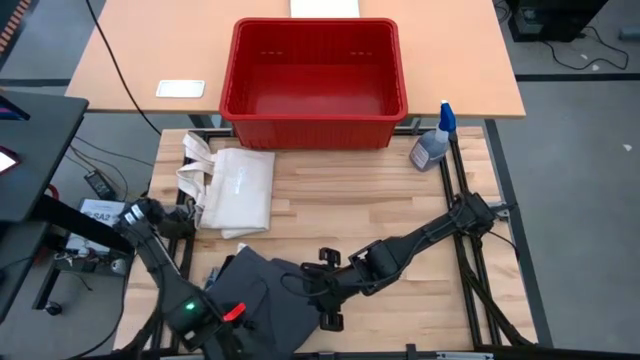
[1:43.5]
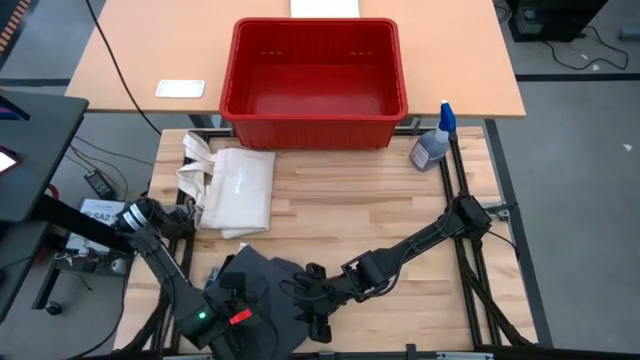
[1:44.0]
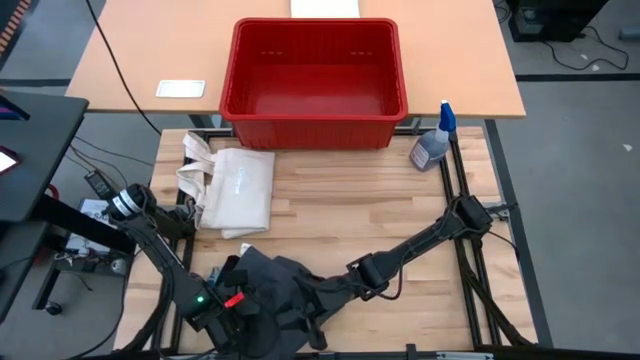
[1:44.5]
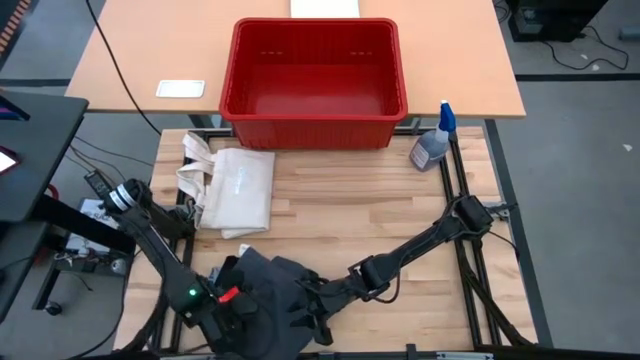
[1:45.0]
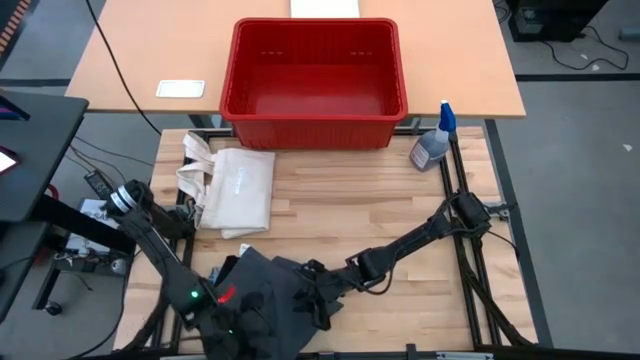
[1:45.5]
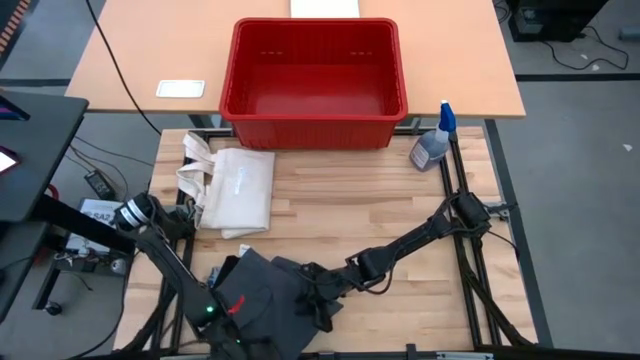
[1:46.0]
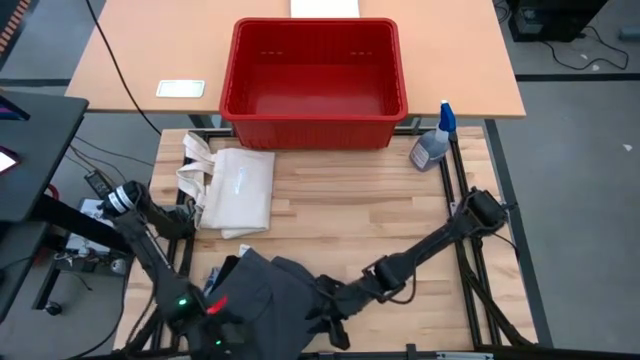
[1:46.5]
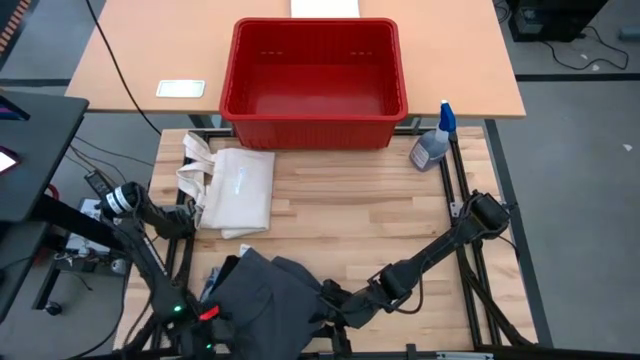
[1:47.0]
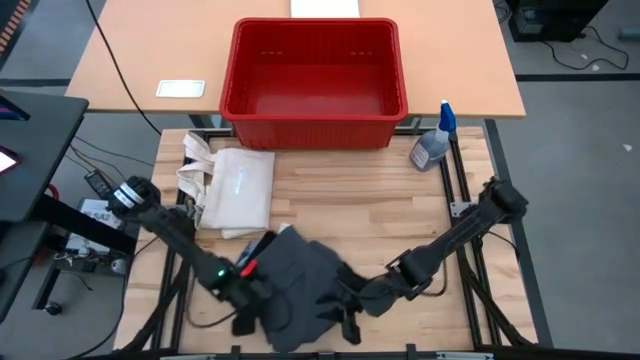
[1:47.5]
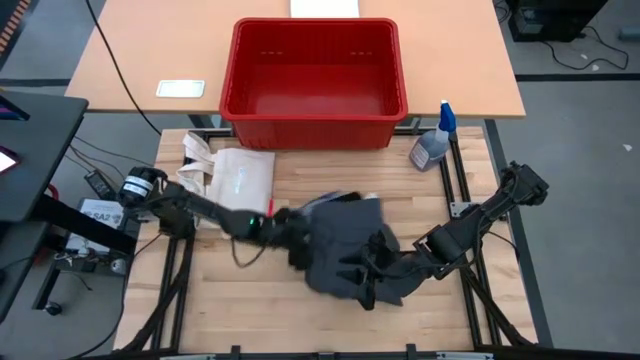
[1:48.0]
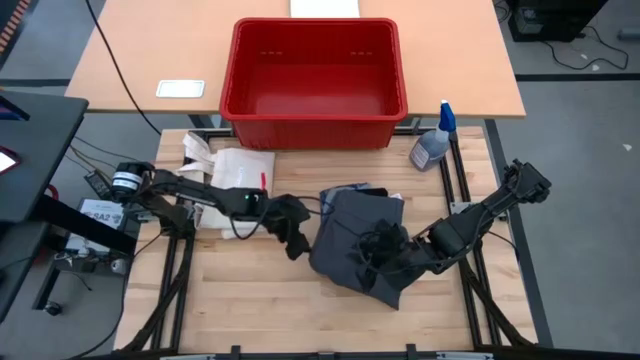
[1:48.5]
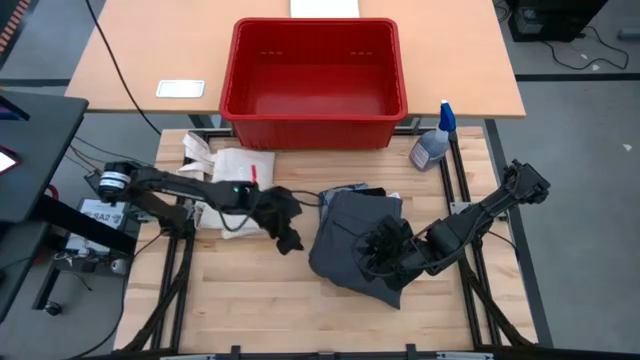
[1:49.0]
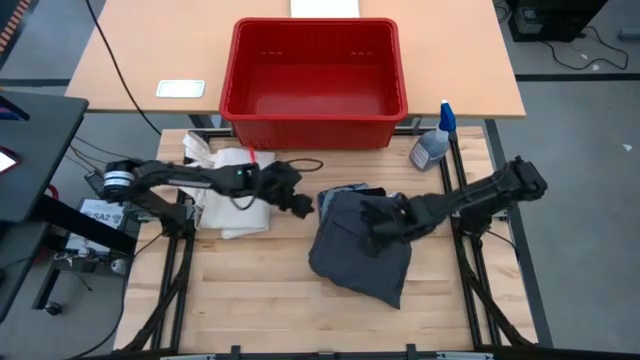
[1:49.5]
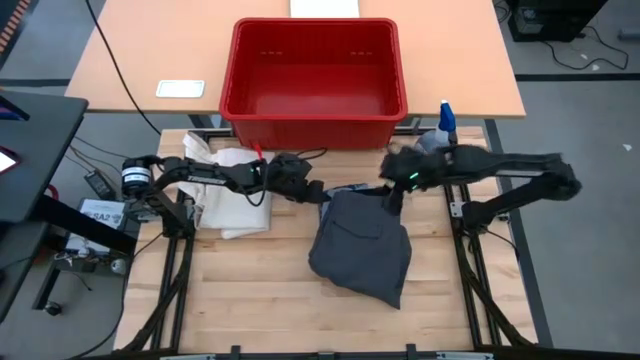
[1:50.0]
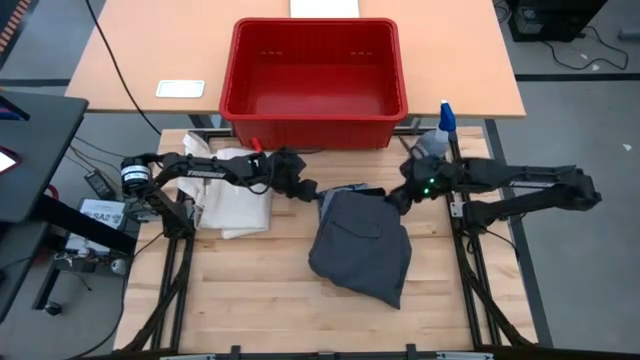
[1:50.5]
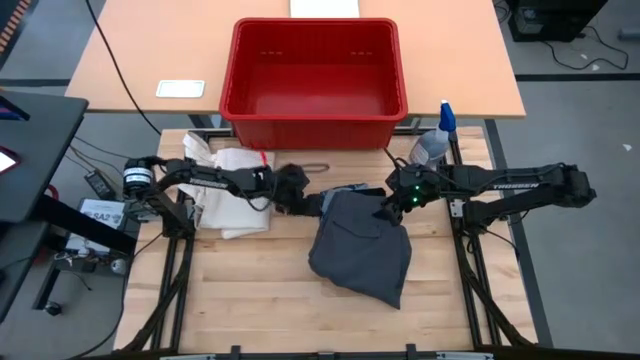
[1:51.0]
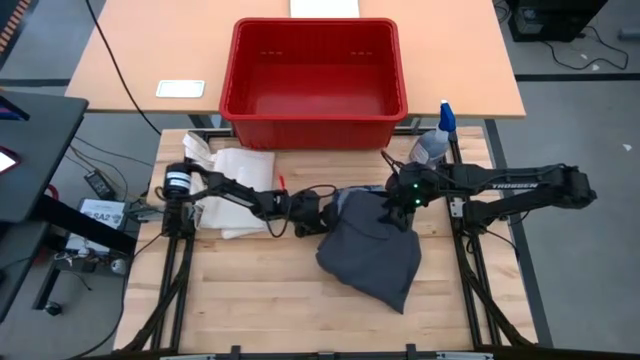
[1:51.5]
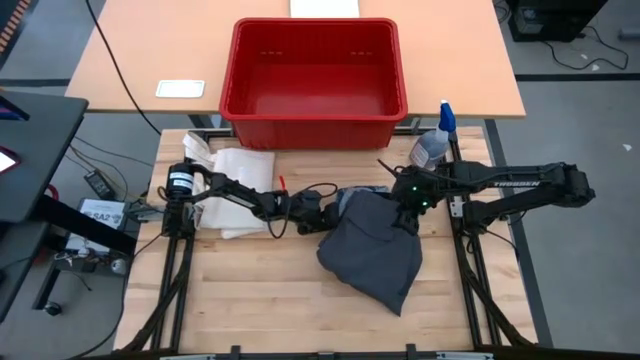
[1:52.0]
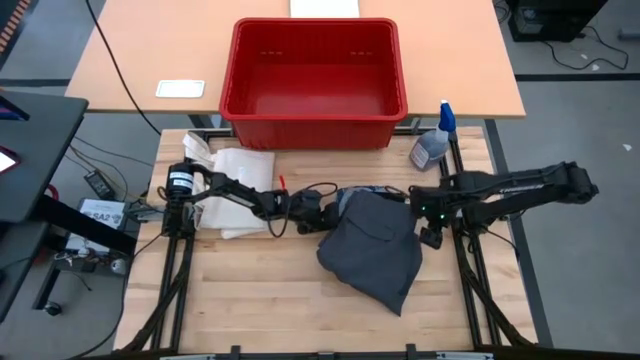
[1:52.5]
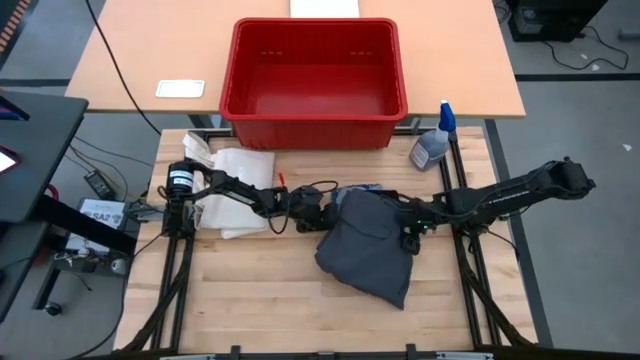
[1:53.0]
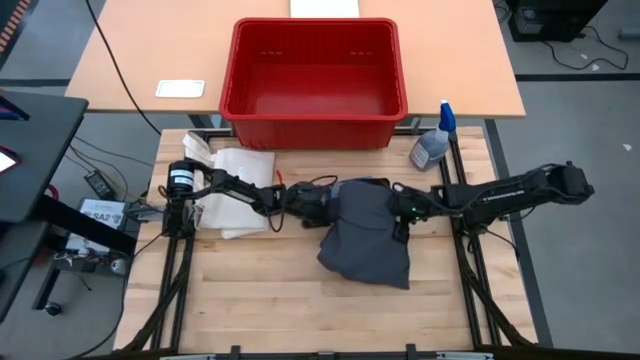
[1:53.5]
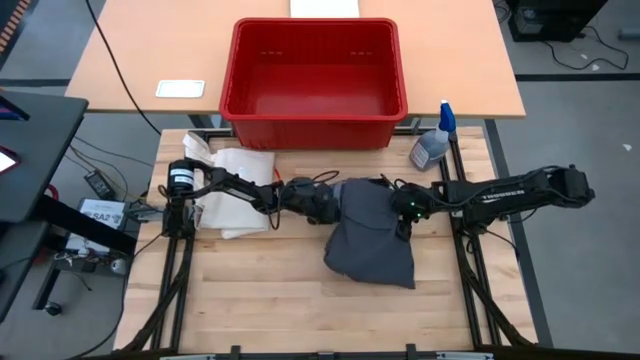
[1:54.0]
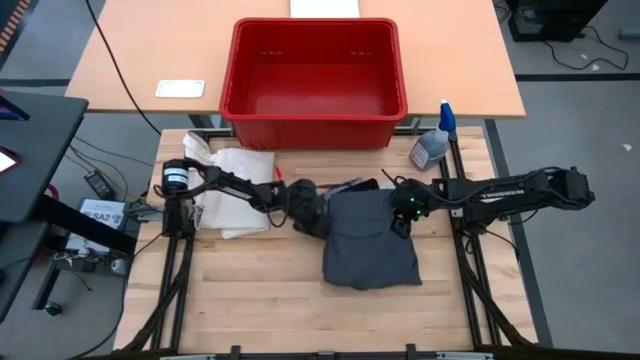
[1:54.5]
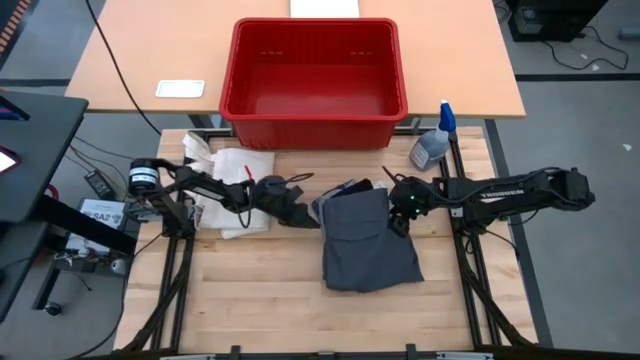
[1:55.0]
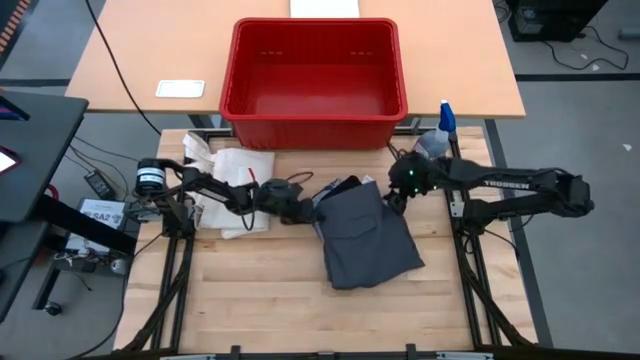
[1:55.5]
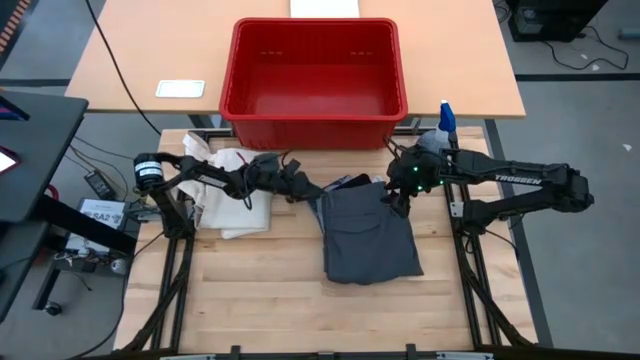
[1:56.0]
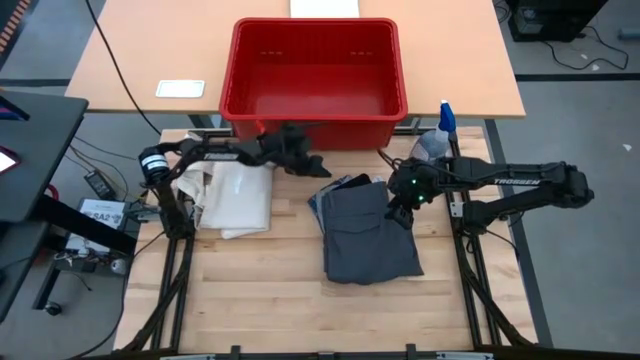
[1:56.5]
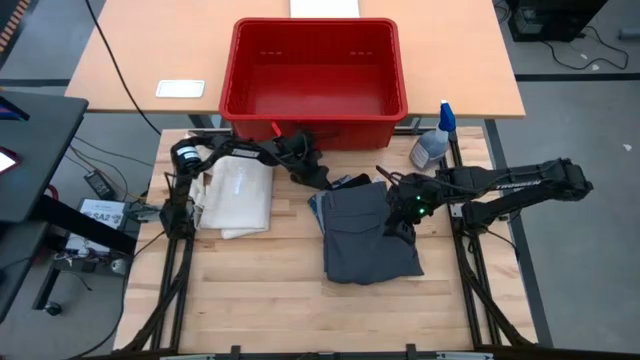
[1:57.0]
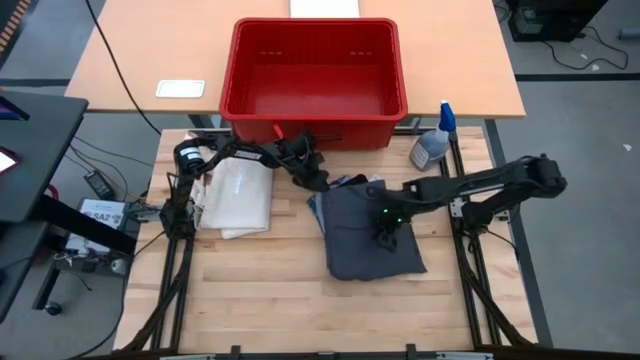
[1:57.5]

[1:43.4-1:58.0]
Task: Sort clothes
Put the stacked clothes into the red bin

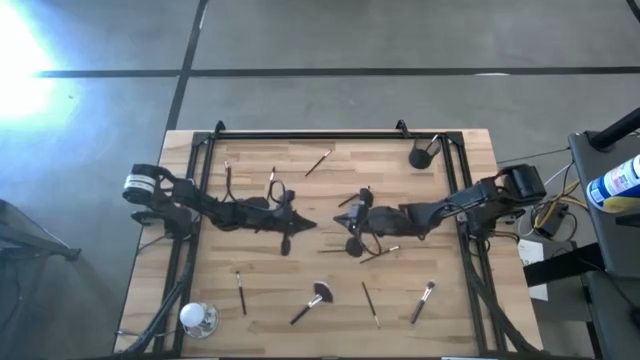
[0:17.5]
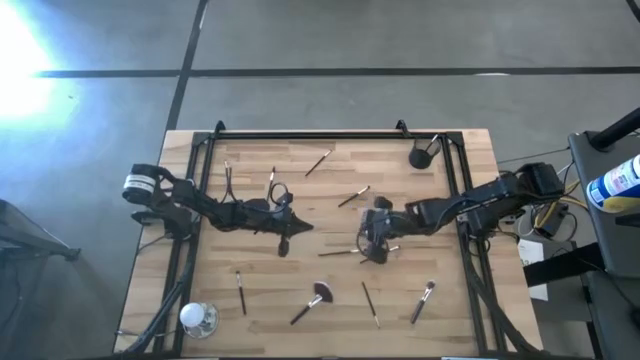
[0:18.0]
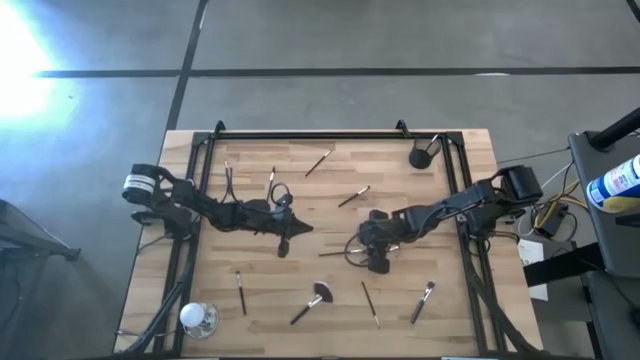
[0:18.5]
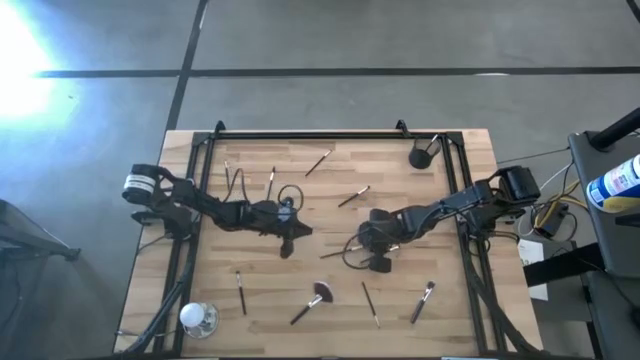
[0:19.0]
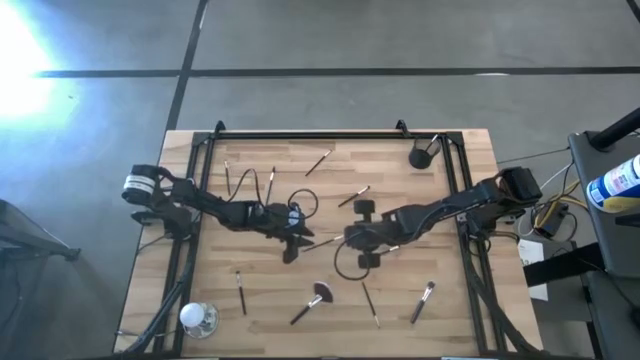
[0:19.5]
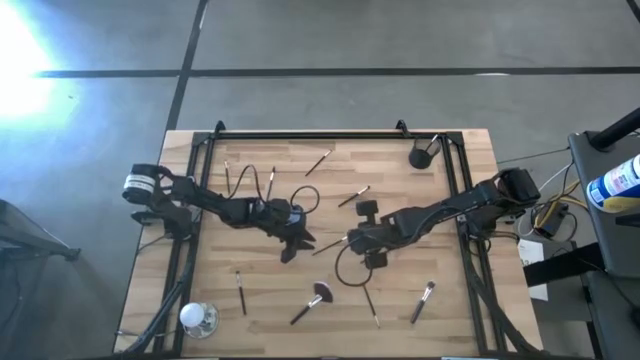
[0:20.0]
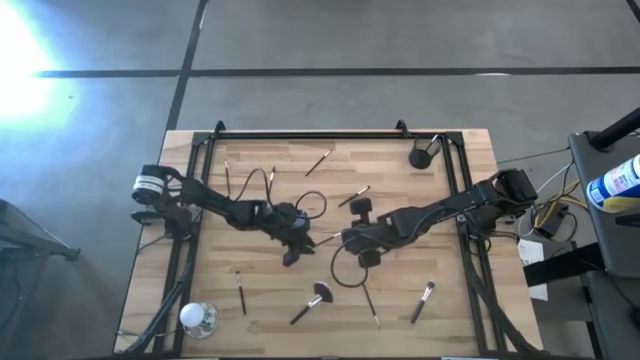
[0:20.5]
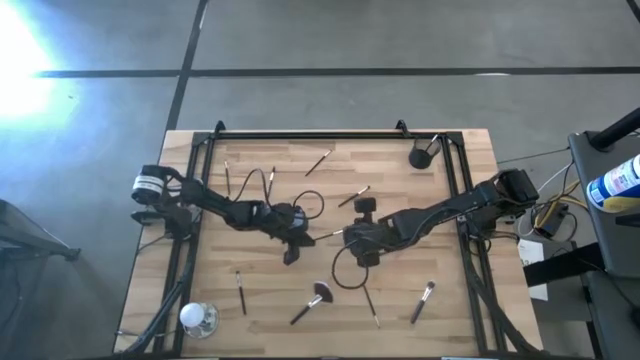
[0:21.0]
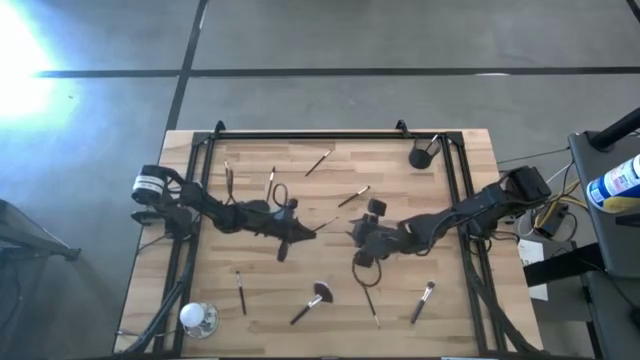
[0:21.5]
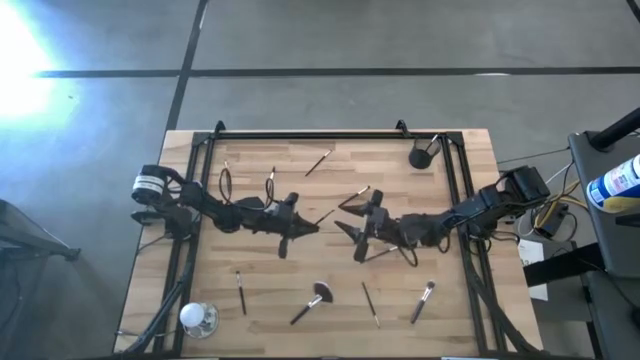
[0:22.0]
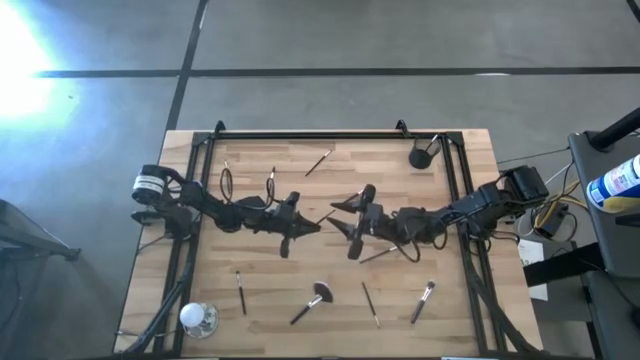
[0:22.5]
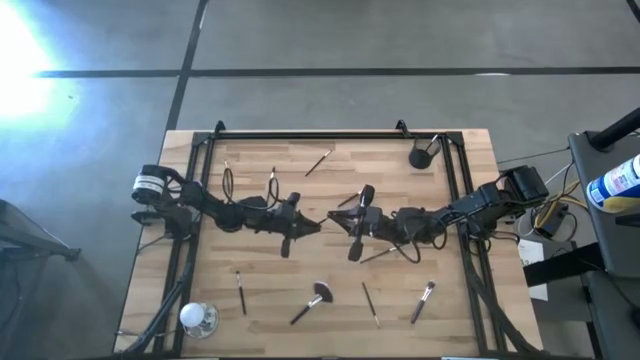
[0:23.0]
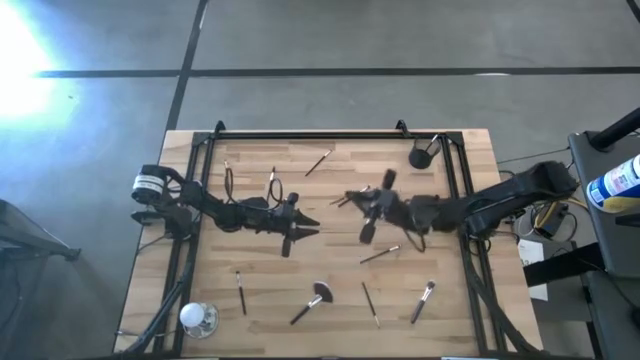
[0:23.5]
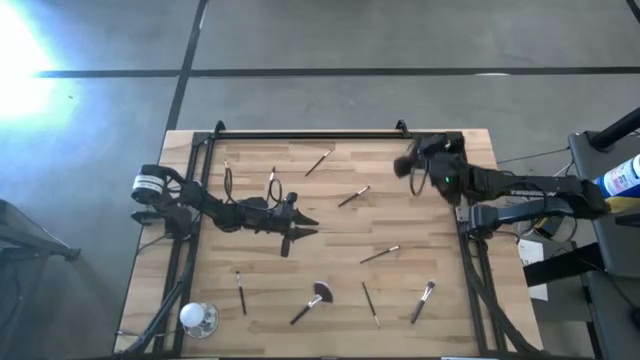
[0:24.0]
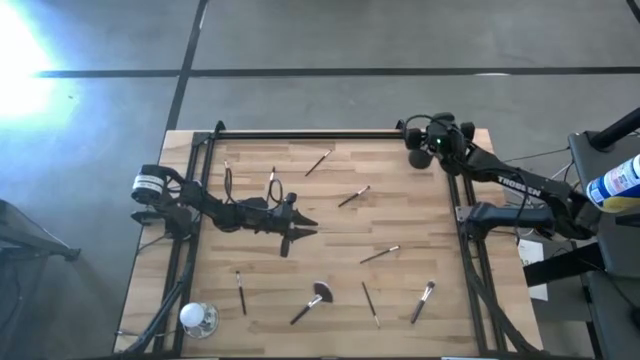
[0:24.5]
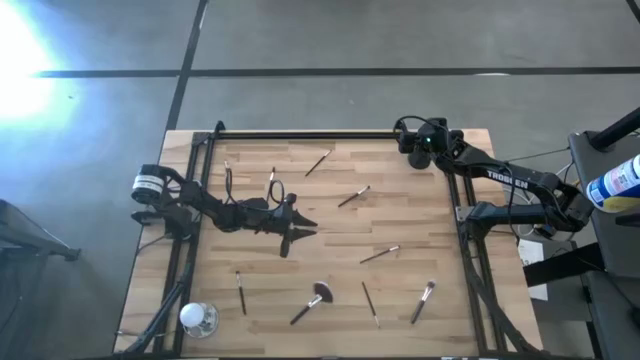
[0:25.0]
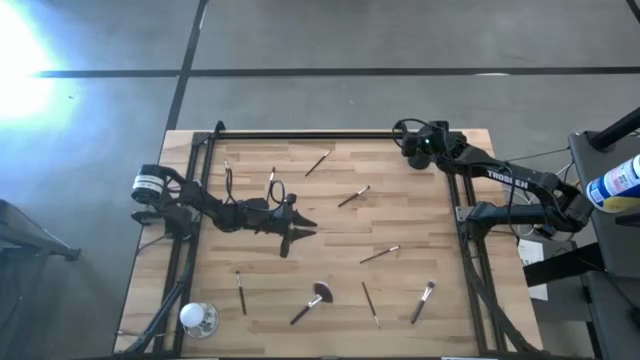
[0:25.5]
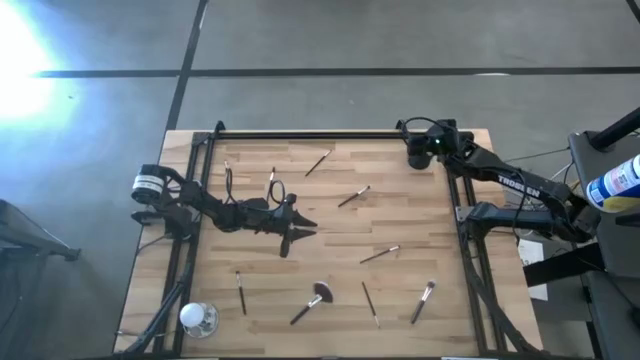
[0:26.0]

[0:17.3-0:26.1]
Task: Put items in baskets/containers
Put the eyeshadow brush into the pen holder
